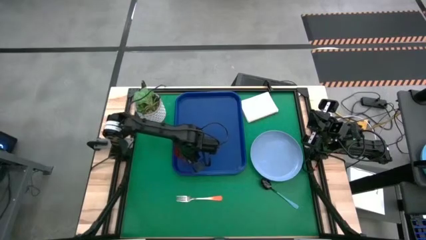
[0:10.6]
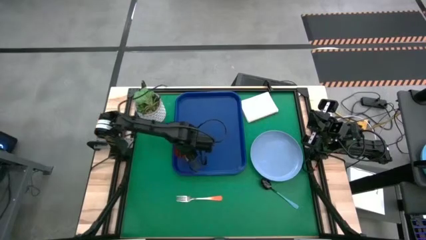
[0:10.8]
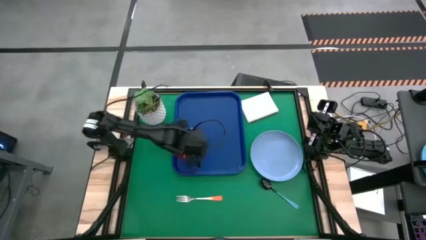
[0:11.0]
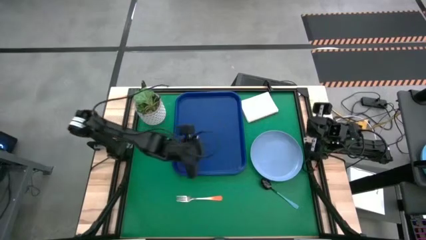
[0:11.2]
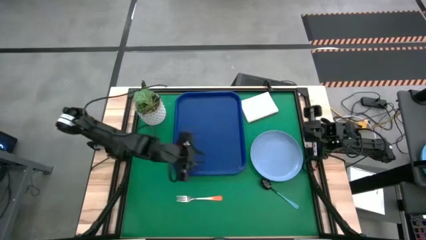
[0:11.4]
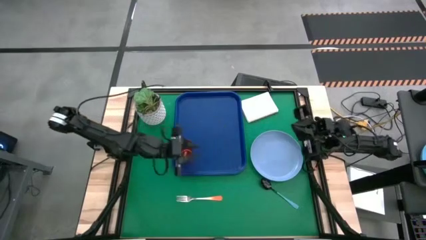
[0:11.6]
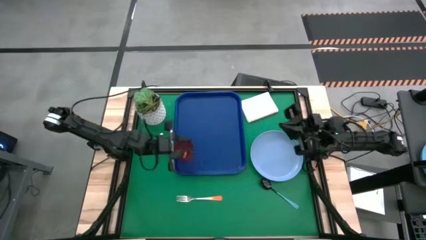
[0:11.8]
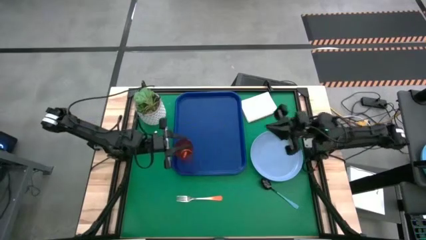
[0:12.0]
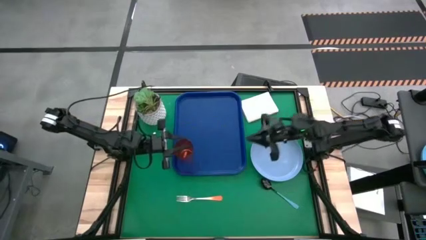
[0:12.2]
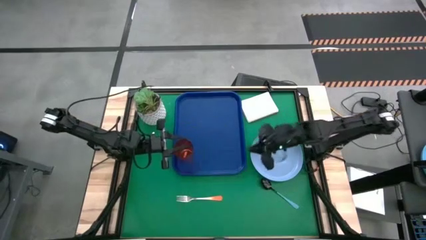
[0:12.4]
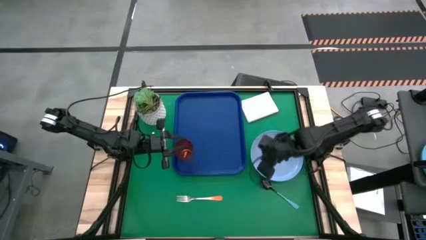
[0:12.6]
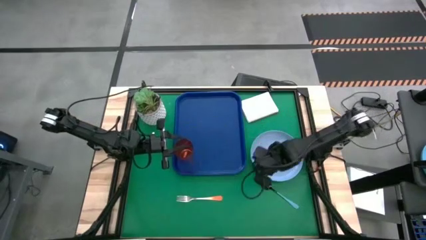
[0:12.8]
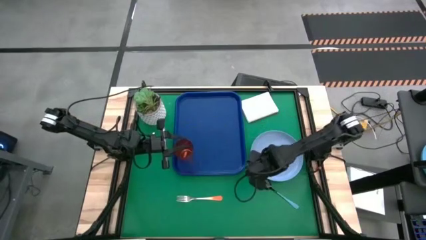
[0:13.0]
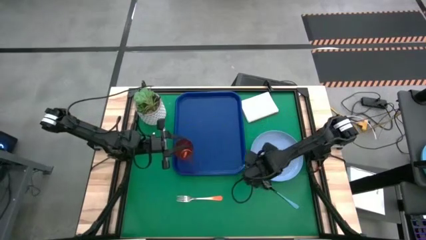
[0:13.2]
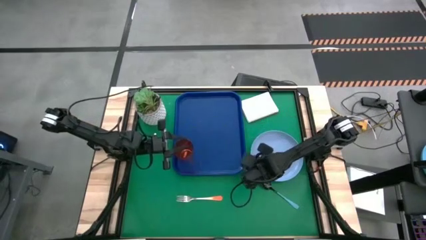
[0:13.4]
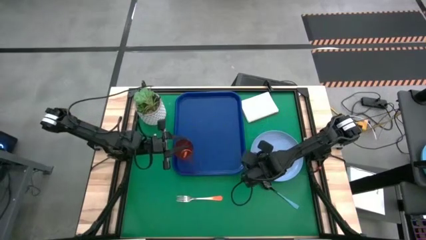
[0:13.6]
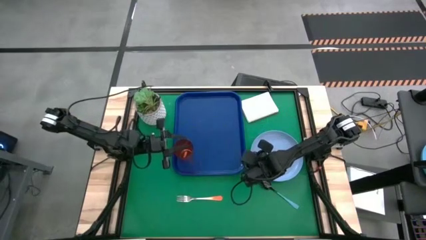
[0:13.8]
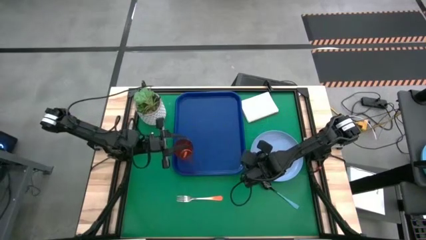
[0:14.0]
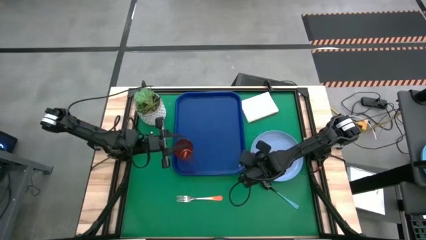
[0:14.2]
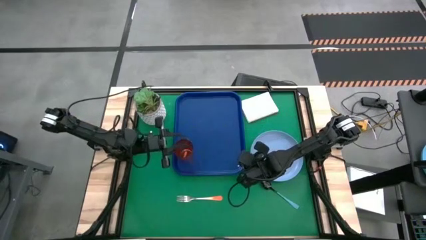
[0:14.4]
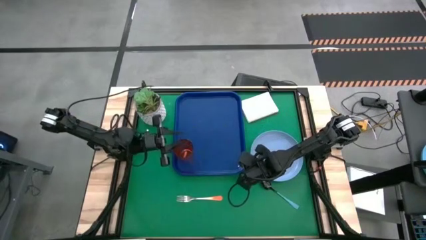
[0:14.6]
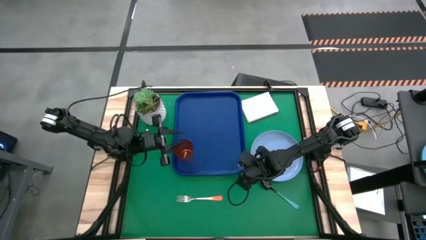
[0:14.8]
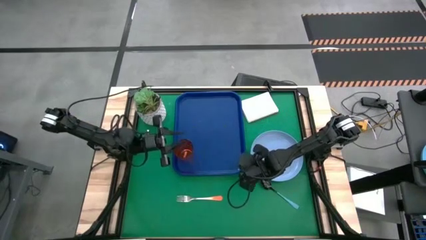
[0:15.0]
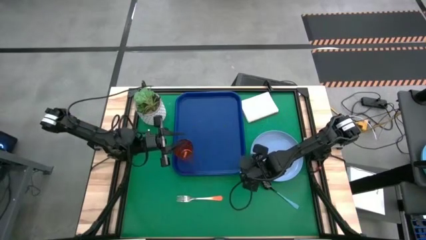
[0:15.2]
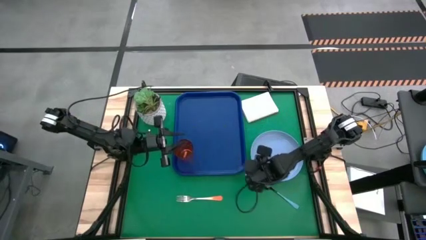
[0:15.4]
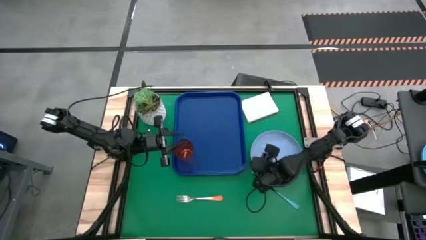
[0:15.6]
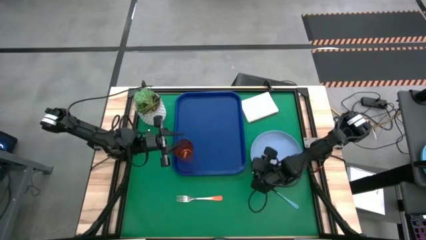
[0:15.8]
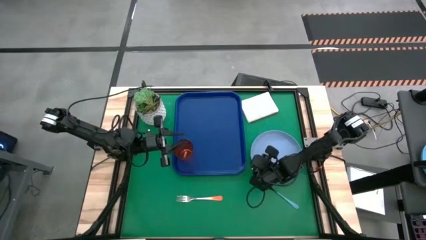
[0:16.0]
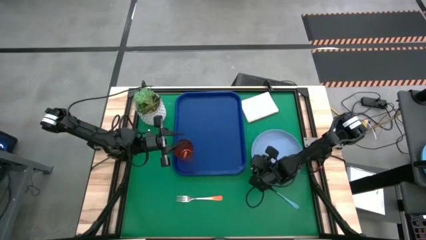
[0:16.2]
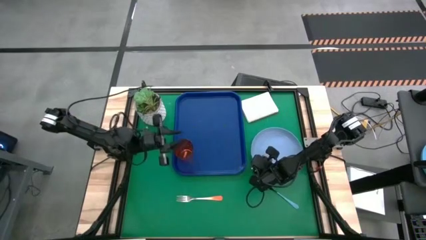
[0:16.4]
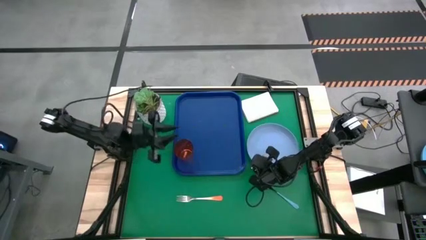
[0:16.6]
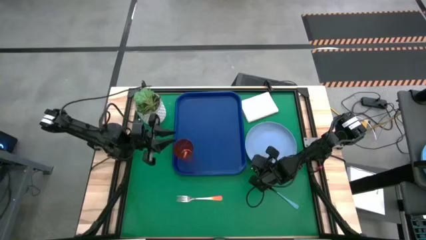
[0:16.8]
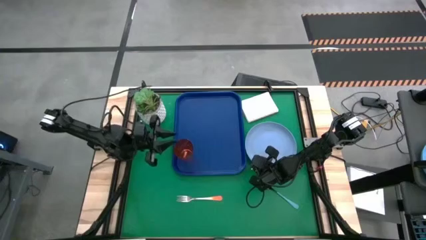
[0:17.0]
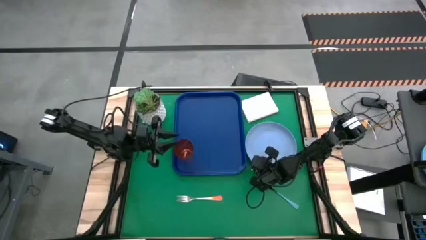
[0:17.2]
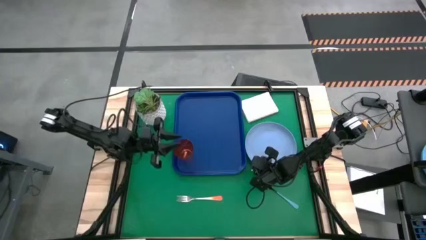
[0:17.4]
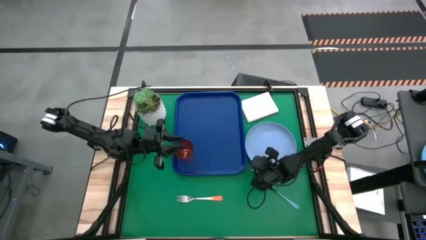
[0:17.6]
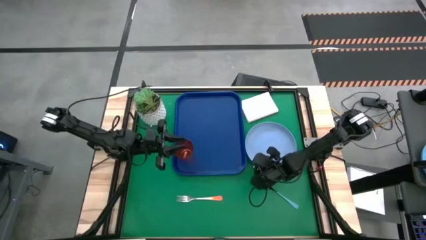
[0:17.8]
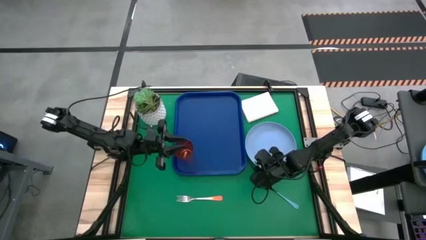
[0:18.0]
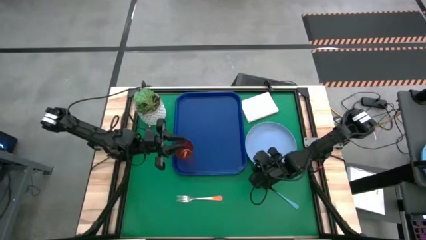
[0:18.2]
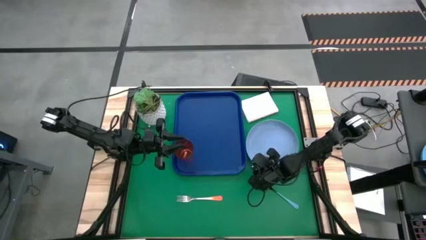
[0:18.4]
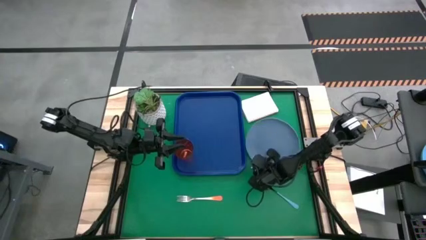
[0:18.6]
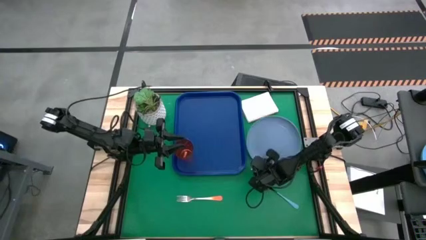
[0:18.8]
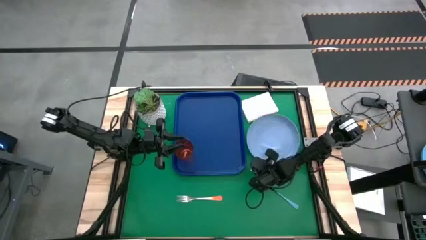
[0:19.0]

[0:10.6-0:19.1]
Task: Pick and place plate/cup/fork/spoon on tray
Put the light blue plate on the blue tray to the right of the brown glass

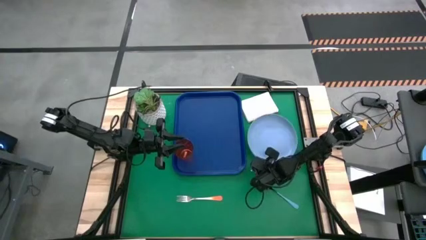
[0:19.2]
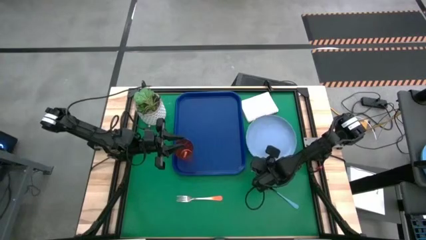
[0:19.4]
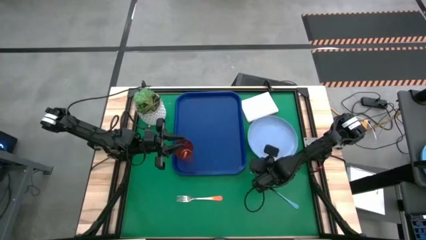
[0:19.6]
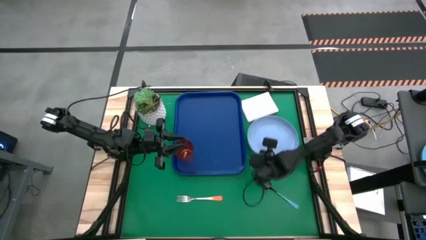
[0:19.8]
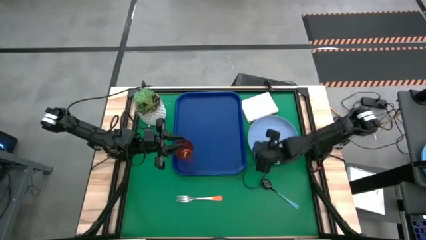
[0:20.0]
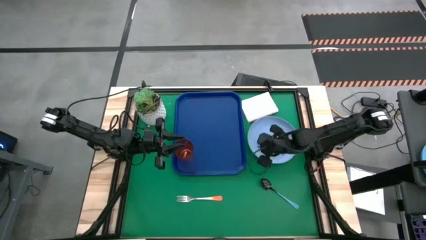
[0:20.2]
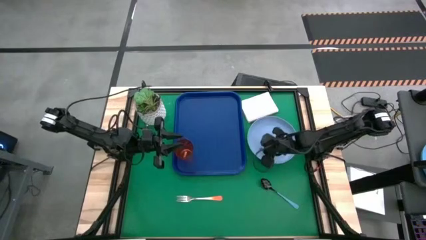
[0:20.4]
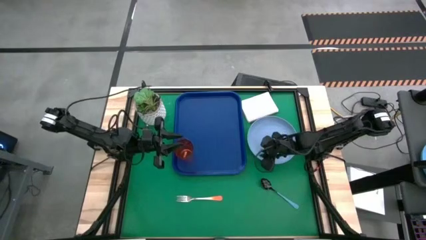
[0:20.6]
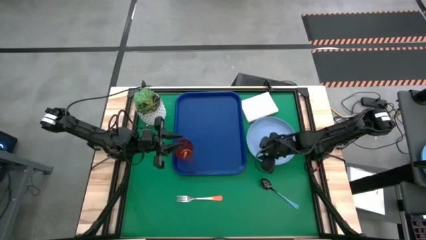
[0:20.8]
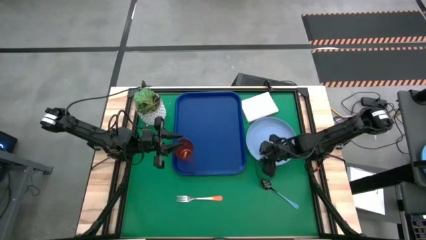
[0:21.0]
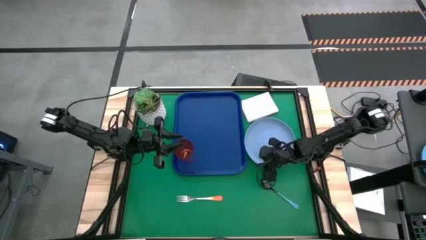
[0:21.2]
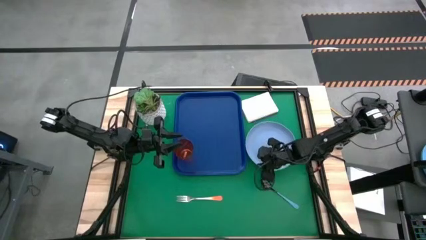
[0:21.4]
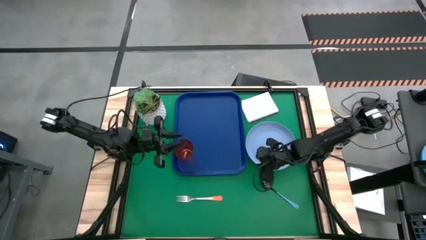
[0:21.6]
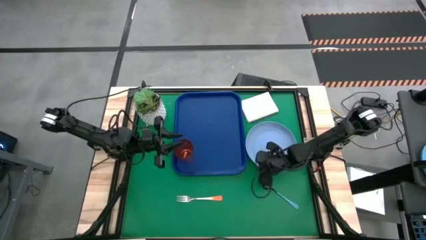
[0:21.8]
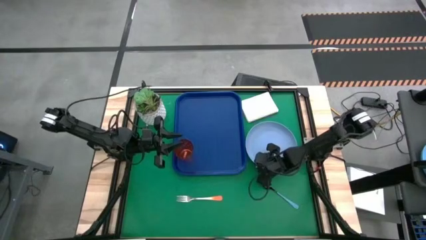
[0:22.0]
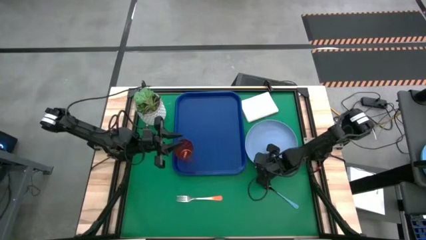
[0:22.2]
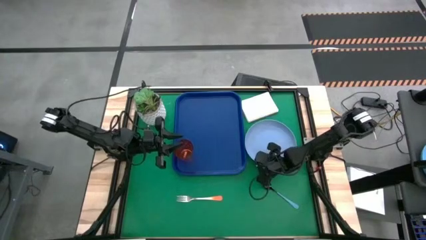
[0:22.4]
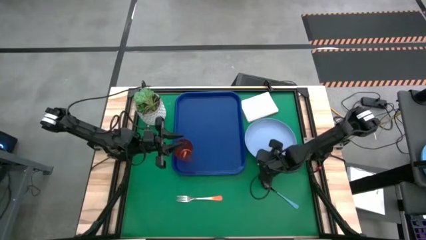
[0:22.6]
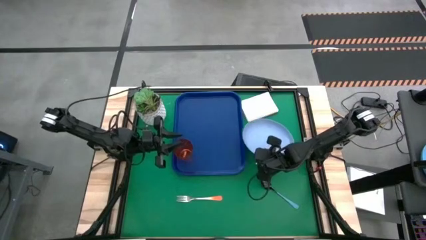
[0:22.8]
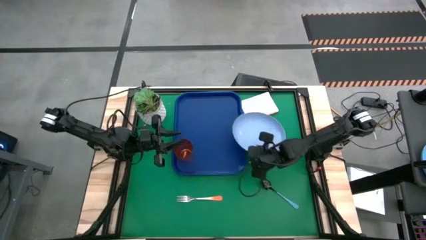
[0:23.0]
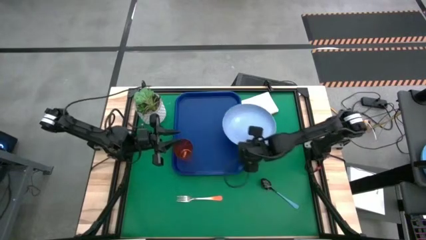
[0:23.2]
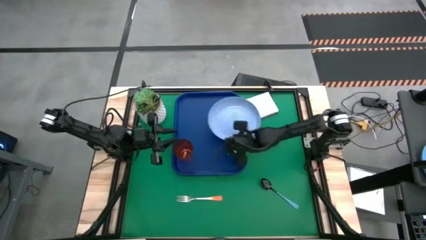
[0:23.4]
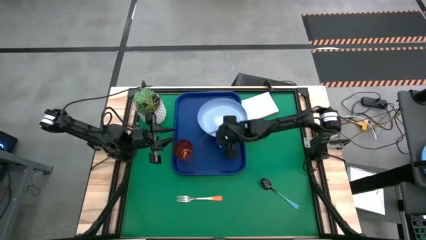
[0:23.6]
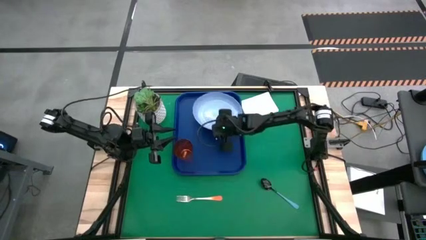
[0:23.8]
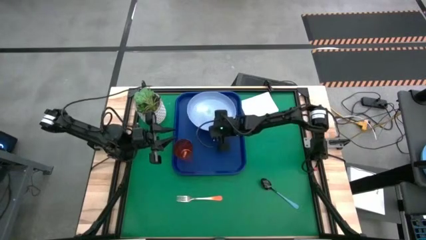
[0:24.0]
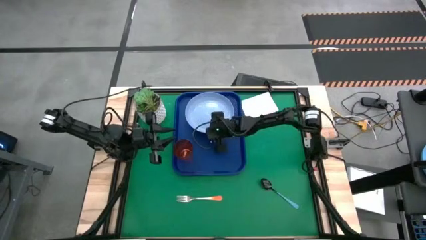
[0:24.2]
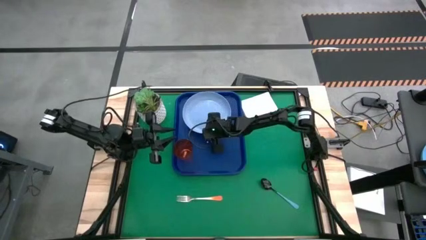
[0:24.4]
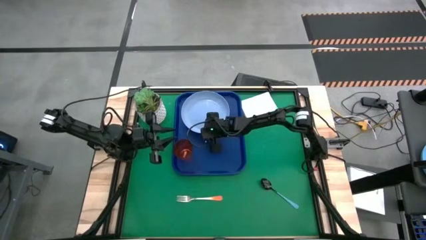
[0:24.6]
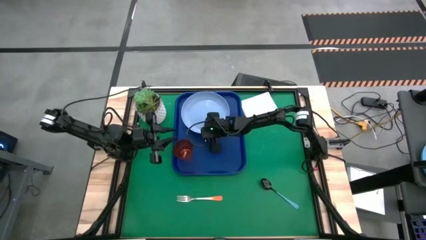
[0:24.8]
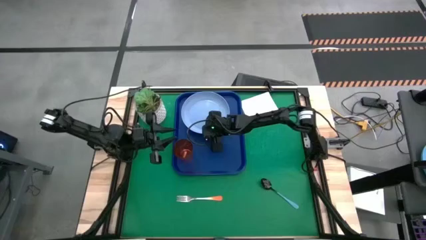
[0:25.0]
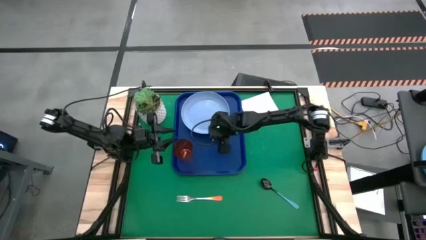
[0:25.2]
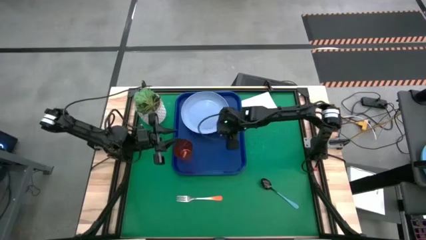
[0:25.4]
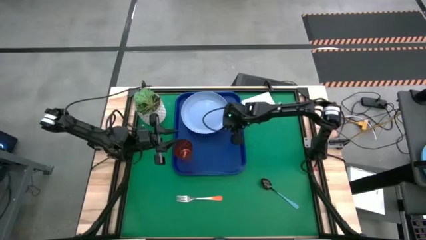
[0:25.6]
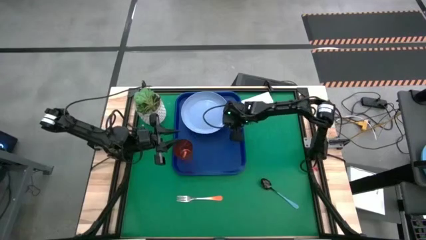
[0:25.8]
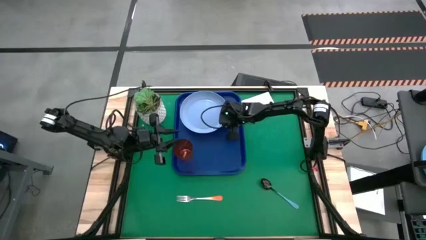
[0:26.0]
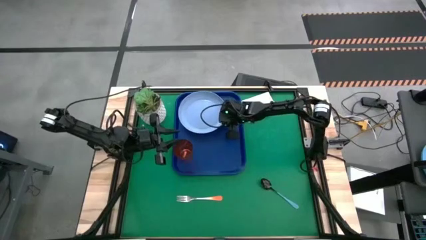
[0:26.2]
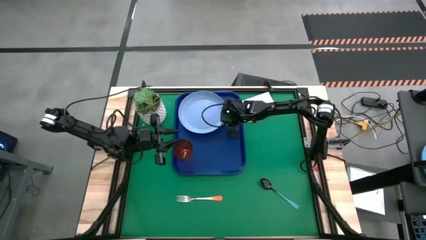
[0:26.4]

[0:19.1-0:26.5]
Put the light blue plate on the blue tray to the right of the brown glass

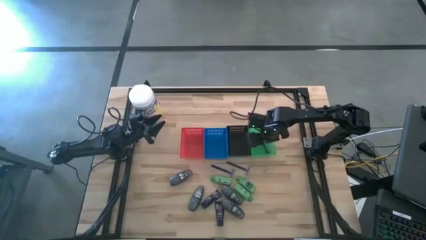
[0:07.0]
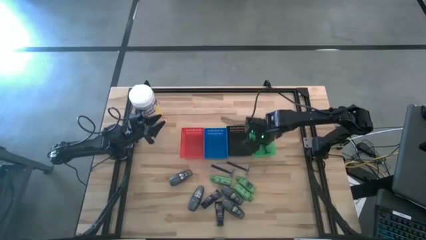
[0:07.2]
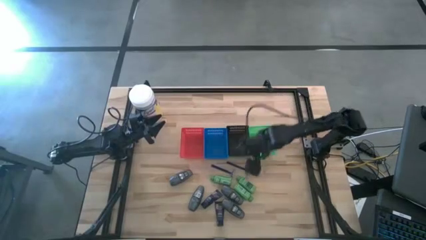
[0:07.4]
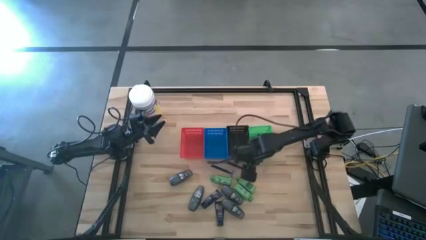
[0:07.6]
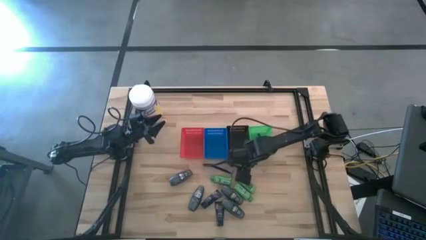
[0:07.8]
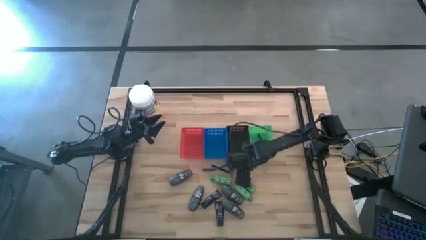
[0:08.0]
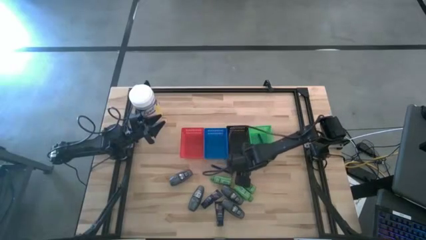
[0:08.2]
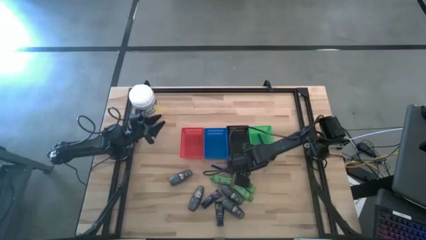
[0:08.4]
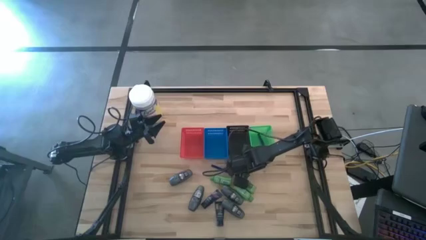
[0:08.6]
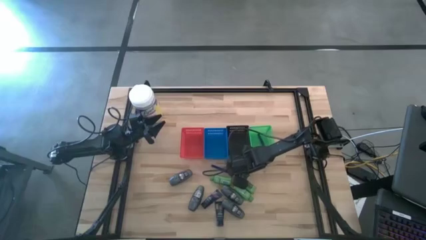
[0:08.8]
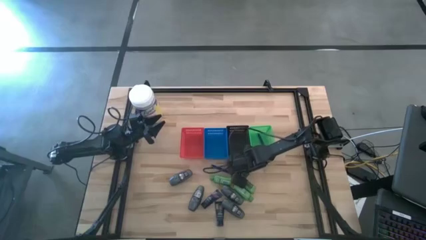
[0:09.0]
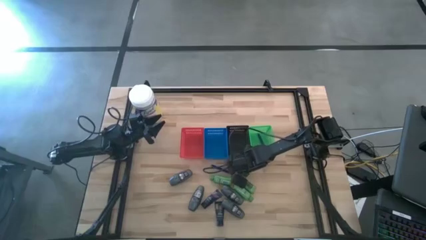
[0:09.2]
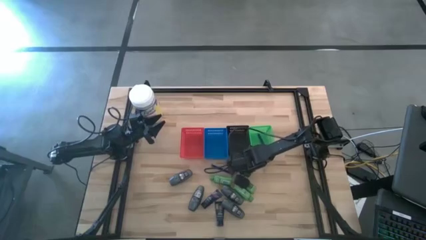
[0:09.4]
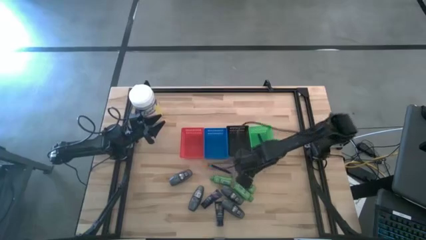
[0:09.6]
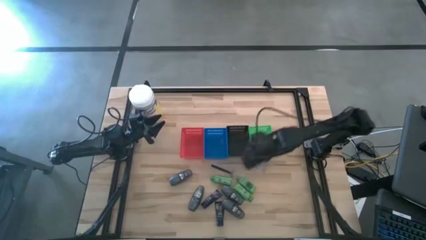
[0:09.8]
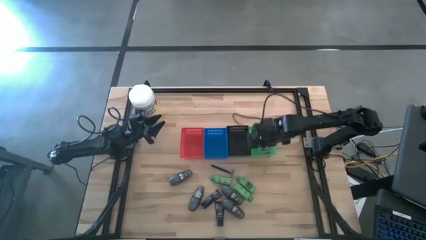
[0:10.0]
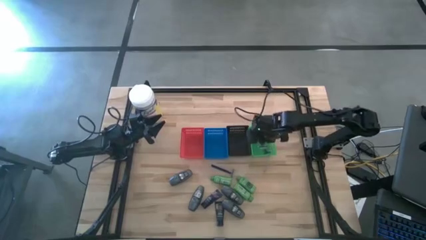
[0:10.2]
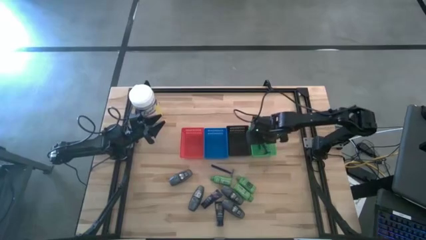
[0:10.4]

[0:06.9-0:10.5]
Task: Pick & Place Travel size toiletries
Put the blue razor into the green bin
